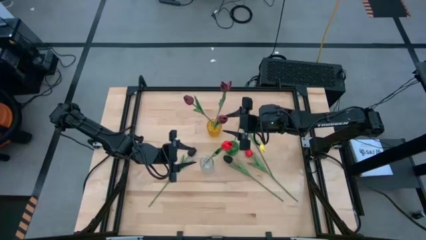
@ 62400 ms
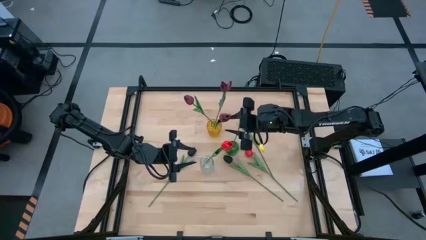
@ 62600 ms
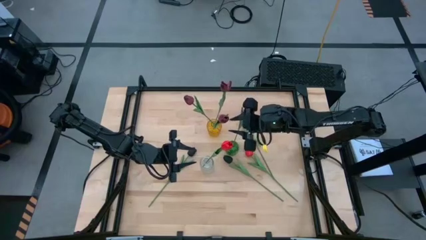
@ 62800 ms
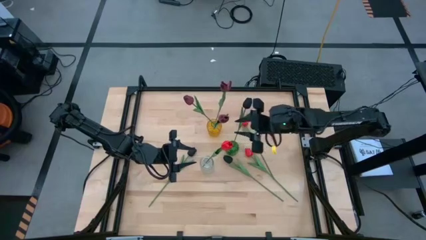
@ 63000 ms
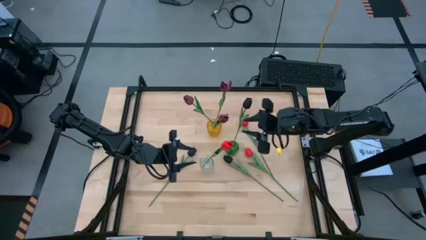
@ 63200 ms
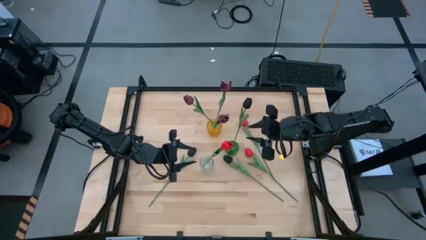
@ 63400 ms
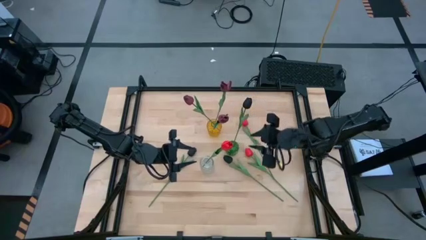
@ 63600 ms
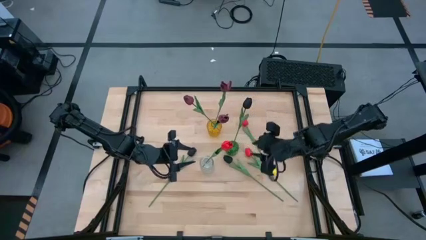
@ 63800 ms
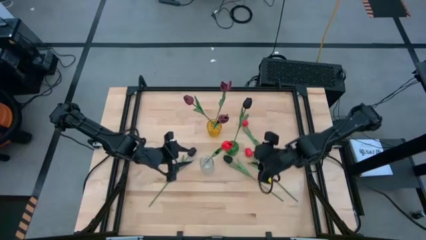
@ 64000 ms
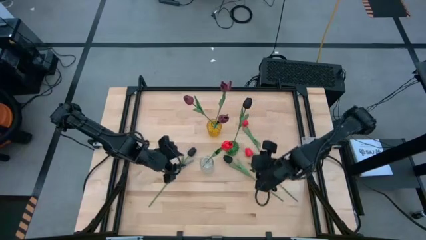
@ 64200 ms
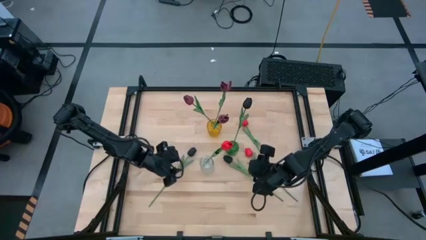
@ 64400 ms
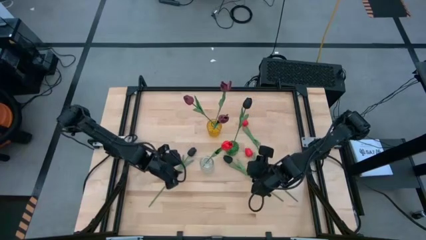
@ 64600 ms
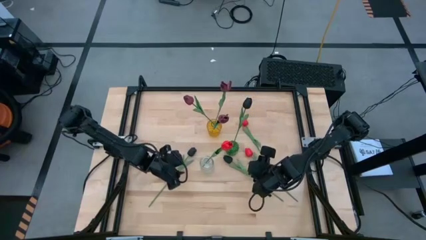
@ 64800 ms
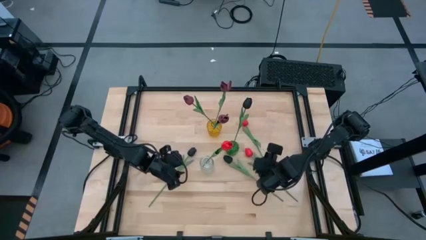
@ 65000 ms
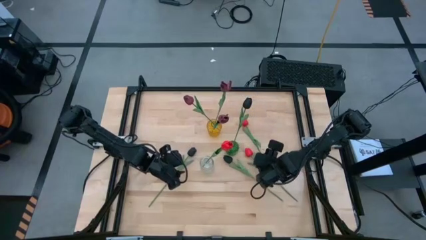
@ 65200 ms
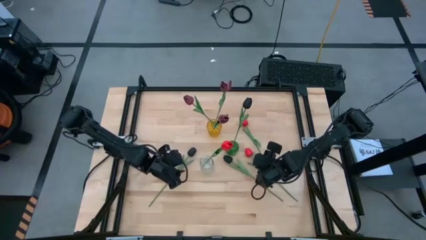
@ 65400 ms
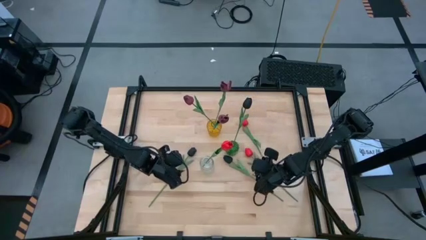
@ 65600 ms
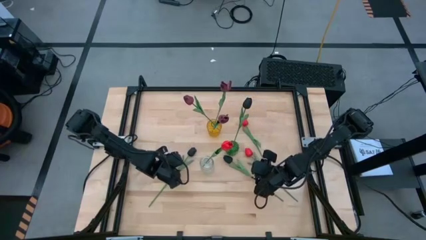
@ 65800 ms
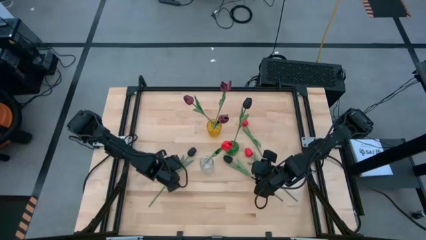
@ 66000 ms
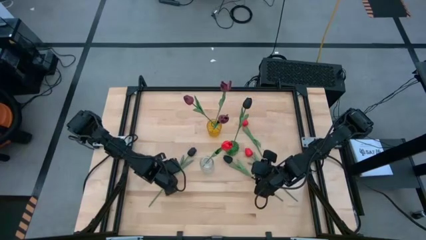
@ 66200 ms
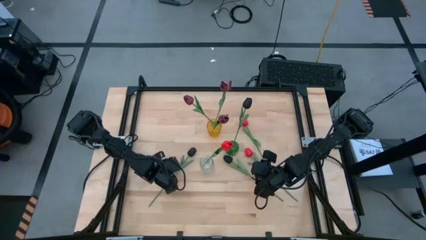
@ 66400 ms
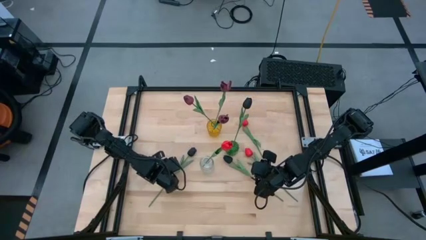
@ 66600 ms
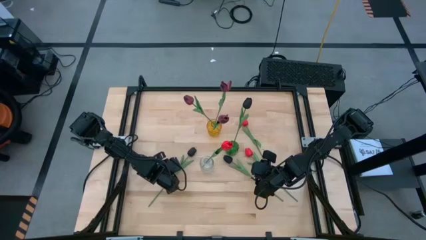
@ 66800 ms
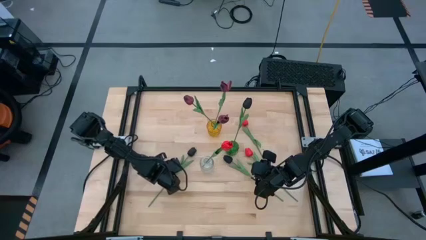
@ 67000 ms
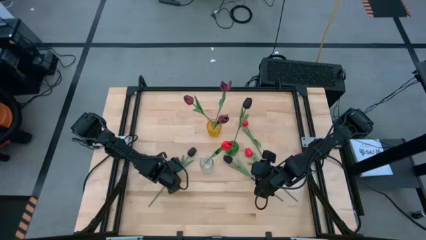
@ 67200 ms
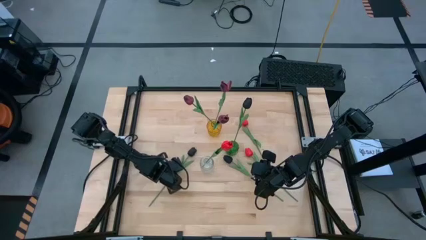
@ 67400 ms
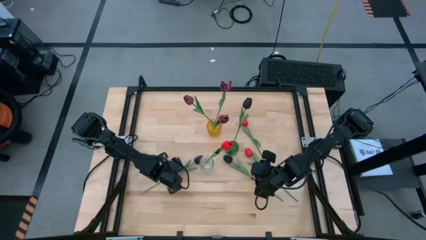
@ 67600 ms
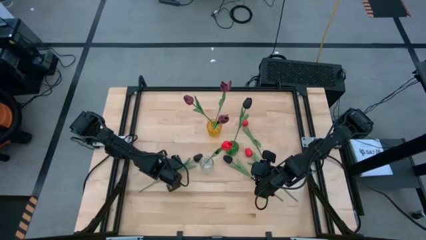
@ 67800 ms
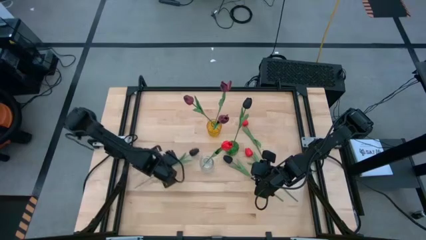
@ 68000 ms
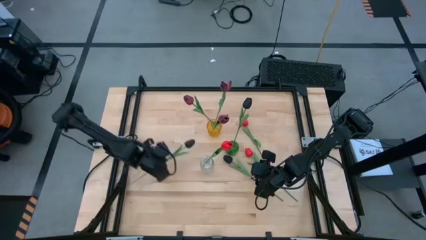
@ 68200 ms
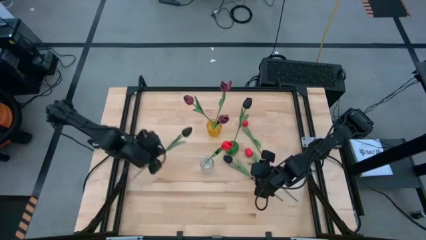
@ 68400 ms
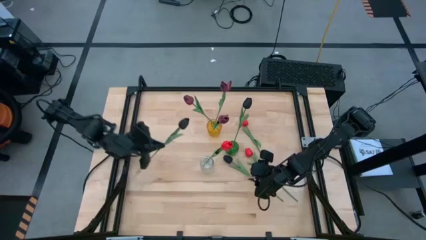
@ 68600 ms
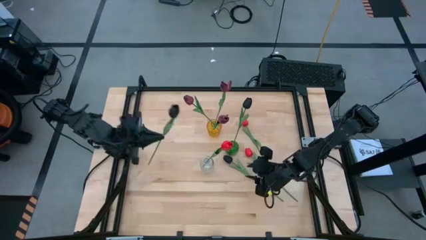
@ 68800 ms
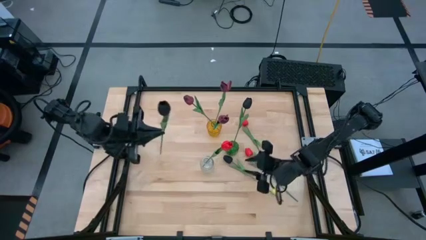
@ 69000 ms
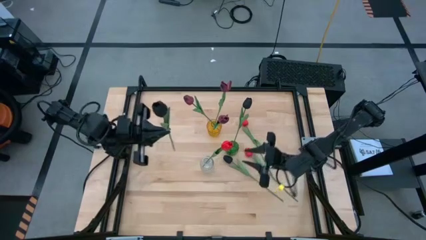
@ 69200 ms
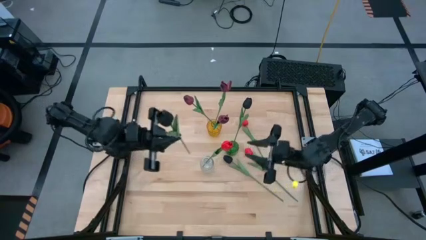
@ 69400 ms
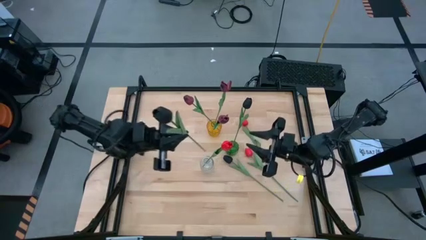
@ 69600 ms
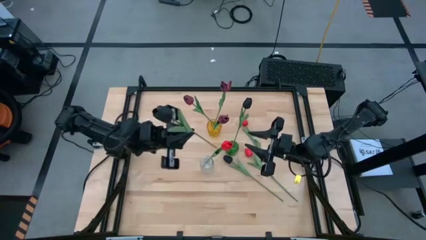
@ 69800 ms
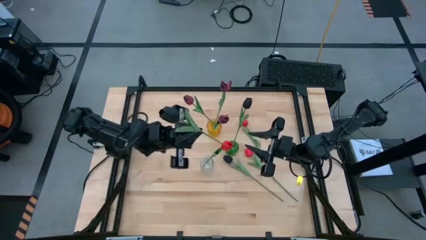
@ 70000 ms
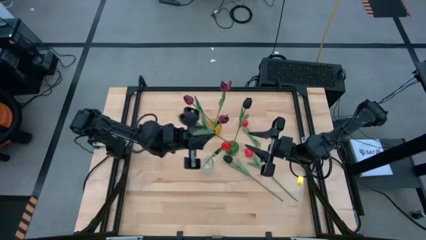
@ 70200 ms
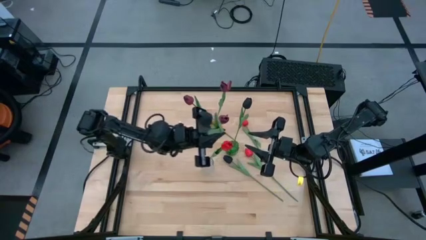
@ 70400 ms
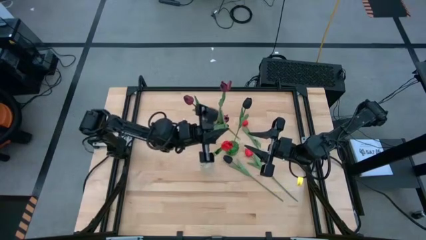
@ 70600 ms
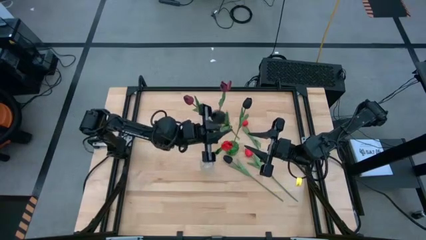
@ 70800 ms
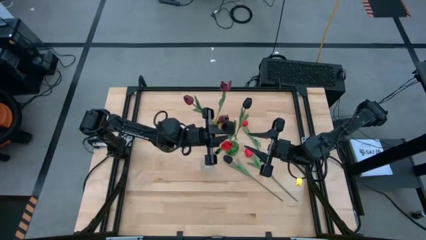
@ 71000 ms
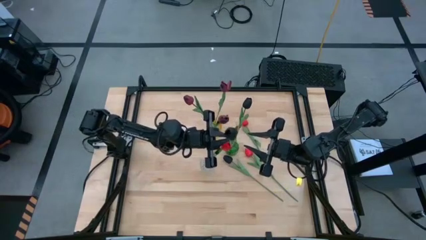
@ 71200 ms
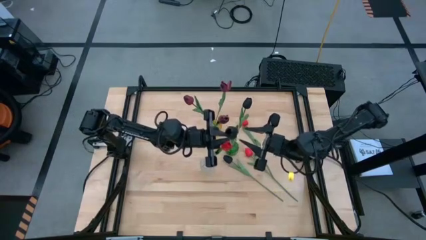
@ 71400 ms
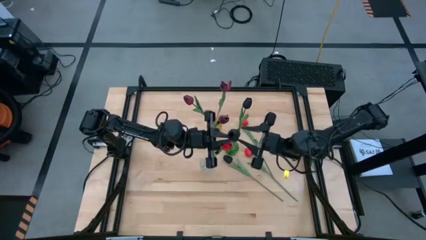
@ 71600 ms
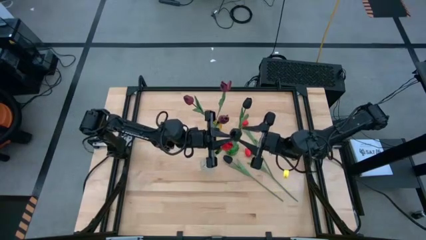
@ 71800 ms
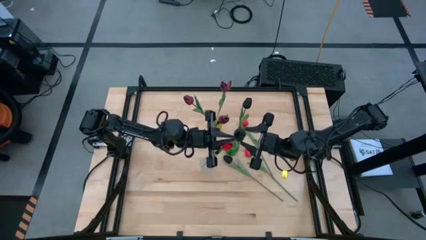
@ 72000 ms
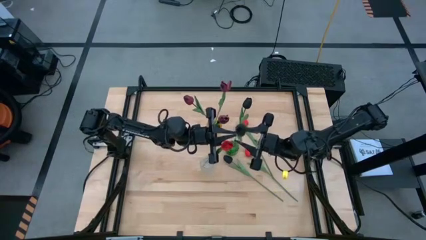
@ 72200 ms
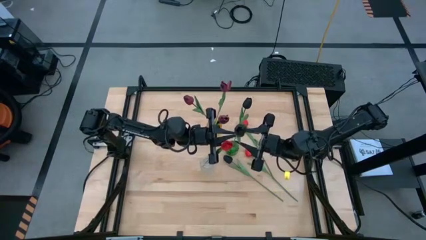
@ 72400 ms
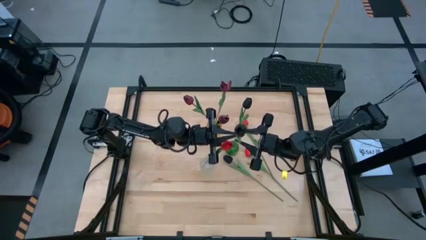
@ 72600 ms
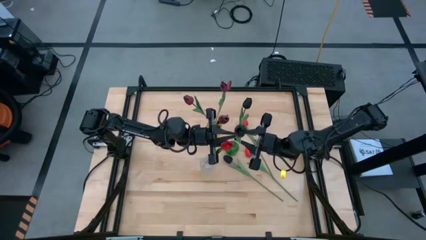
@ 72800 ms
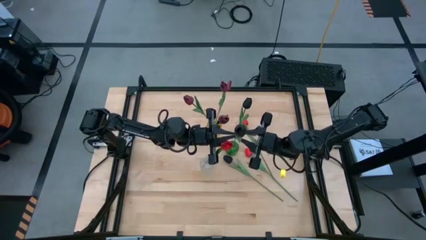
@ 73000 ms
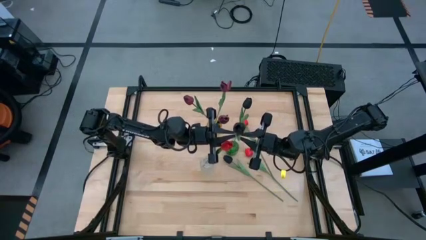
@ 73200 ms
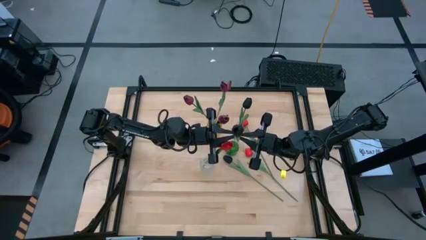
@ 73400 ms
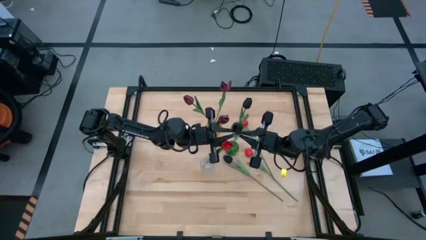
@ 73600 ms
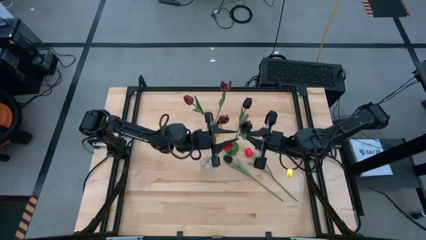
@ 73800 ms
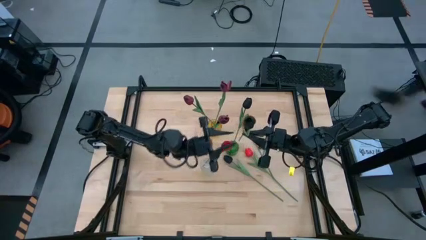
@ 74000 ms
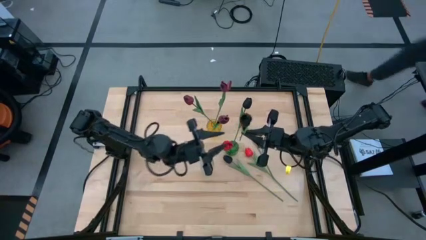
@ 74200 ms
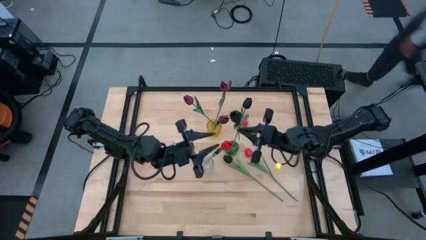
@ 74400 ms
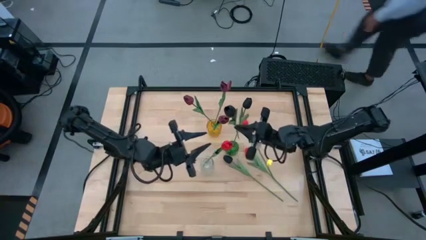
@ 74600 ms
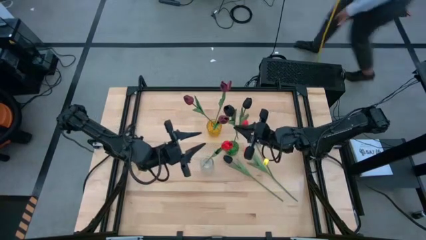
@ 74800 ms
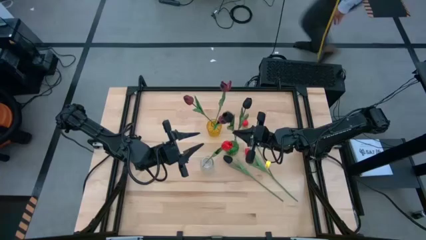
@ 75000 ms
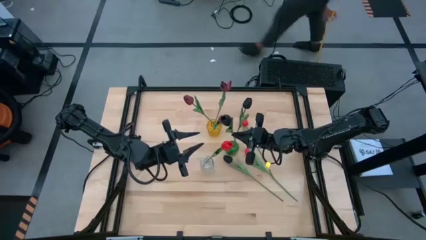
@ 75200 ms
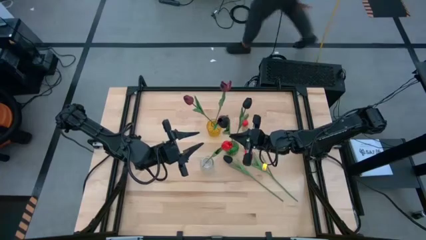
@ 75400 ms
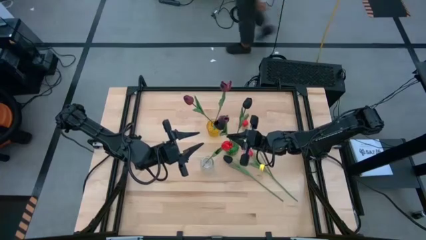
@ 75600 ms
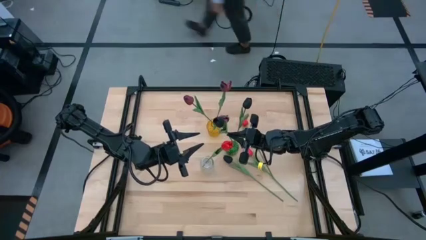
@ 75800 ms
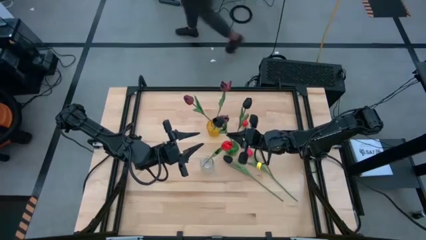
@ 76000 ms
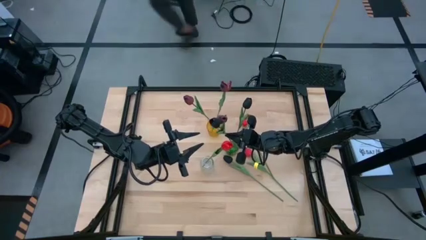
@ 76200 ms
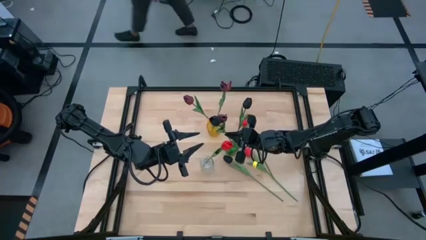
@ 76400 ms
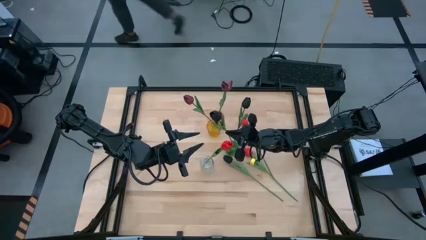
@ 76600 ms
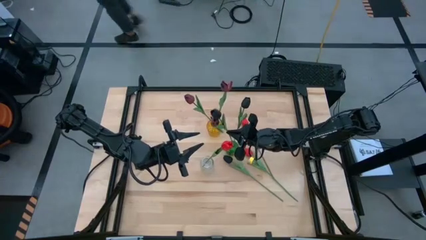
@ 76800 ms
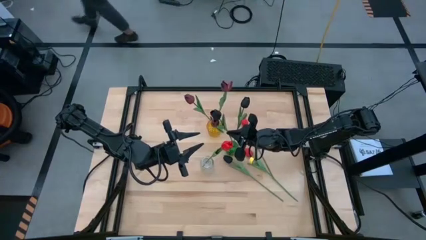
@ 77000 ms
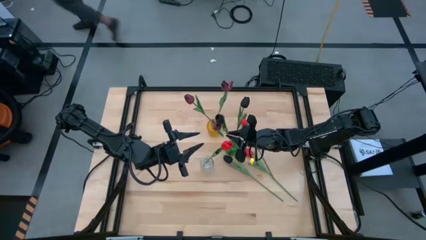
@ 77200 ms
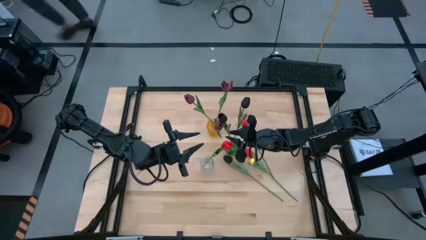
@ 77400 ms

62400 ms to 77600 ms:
Task: Sort flowers into vase by color
Put the bottom left black flower in the green flower vase
